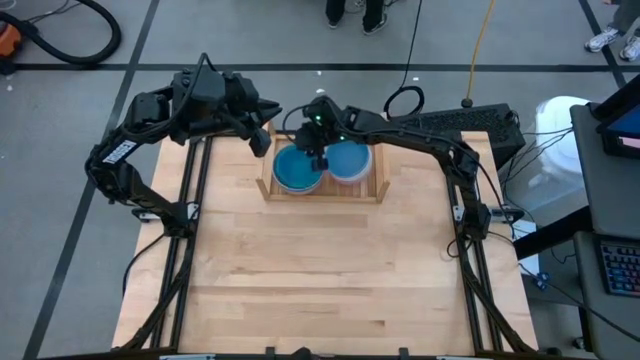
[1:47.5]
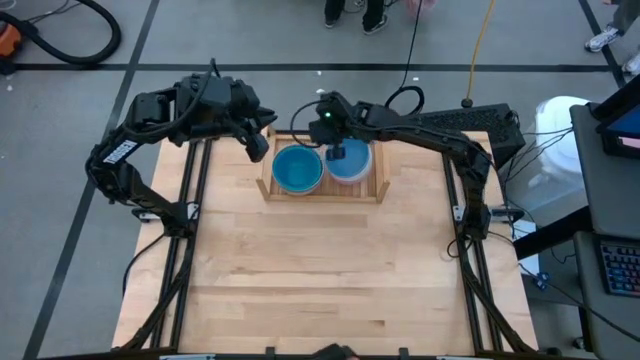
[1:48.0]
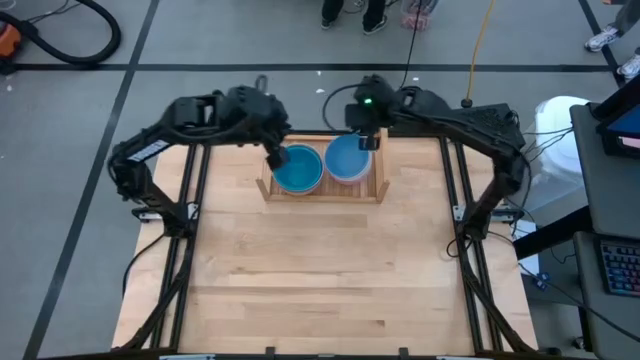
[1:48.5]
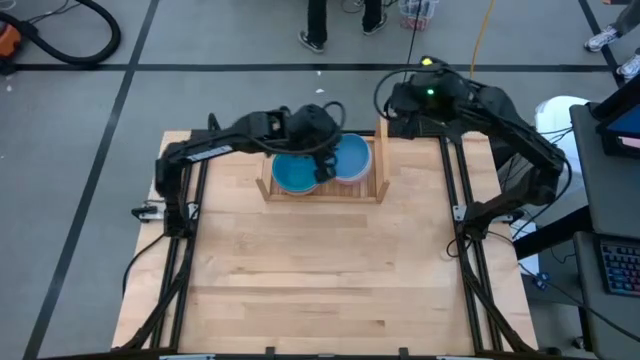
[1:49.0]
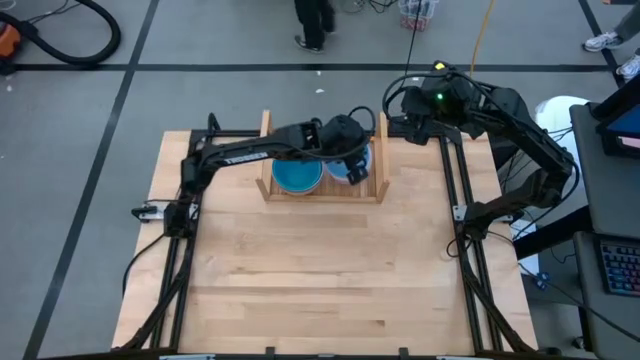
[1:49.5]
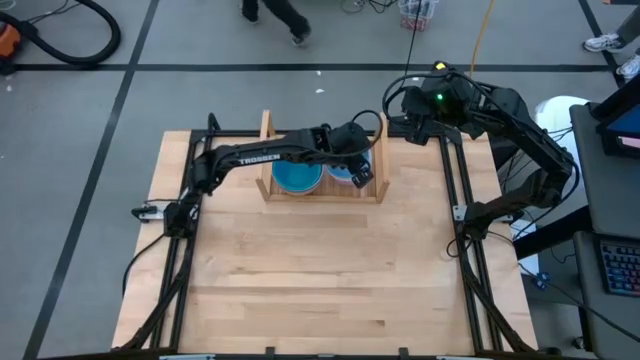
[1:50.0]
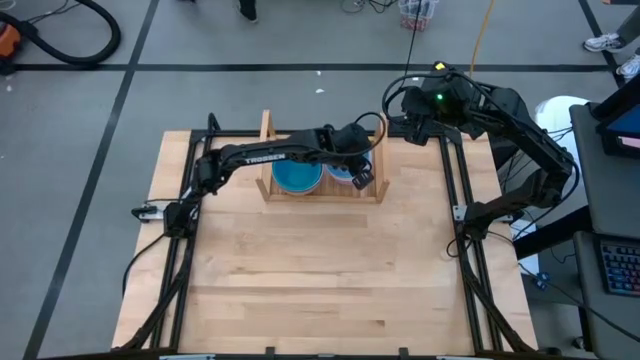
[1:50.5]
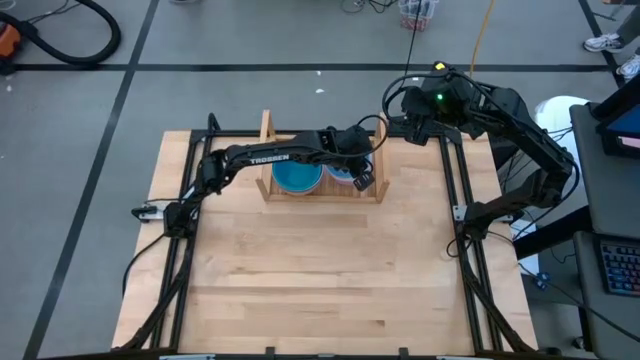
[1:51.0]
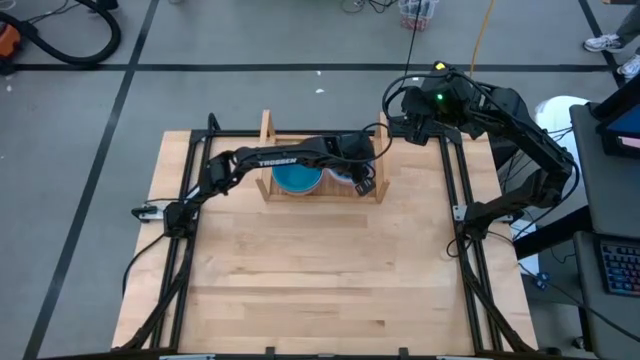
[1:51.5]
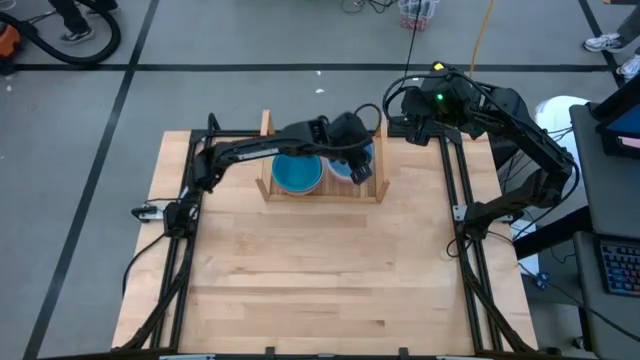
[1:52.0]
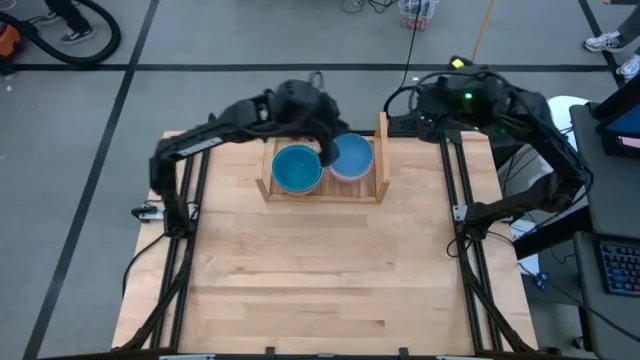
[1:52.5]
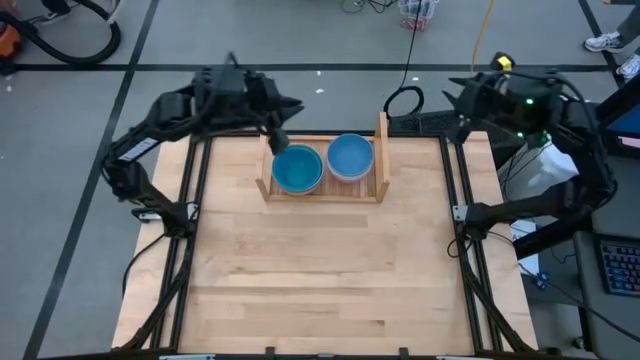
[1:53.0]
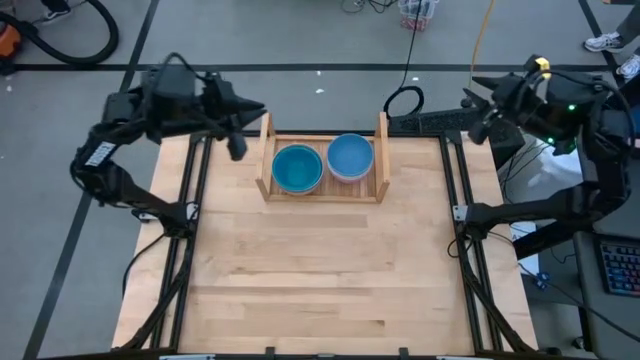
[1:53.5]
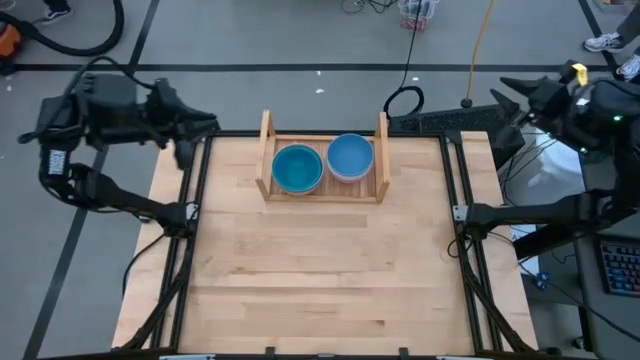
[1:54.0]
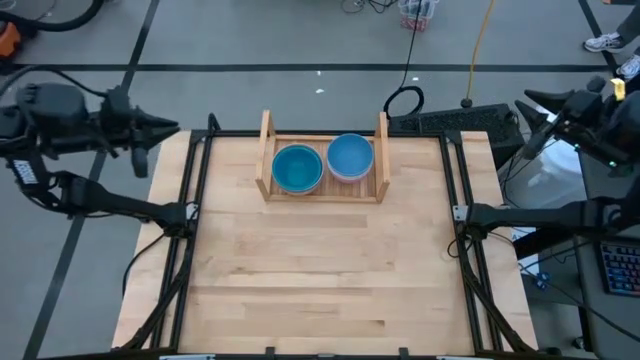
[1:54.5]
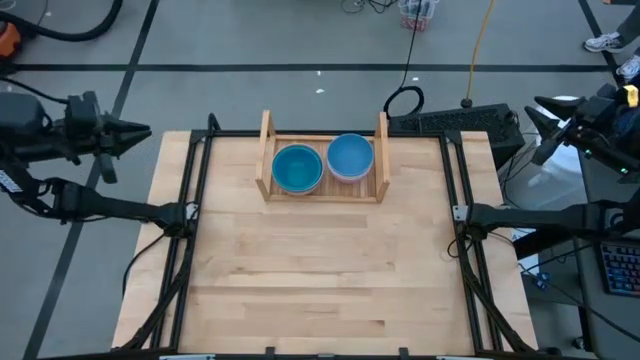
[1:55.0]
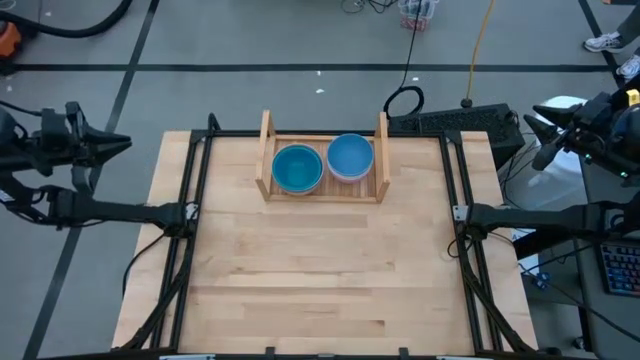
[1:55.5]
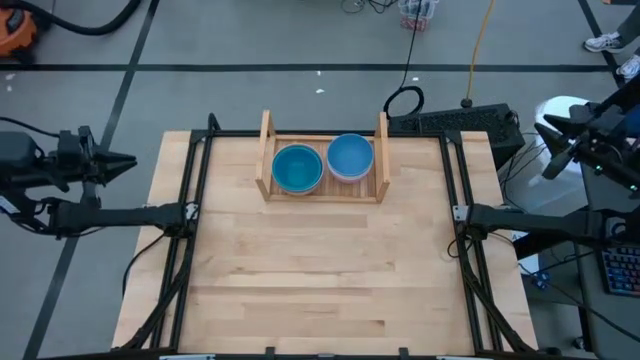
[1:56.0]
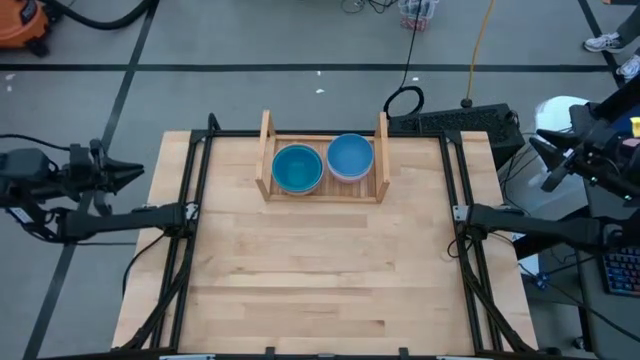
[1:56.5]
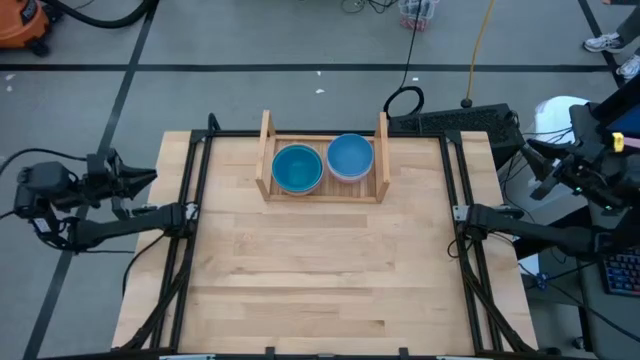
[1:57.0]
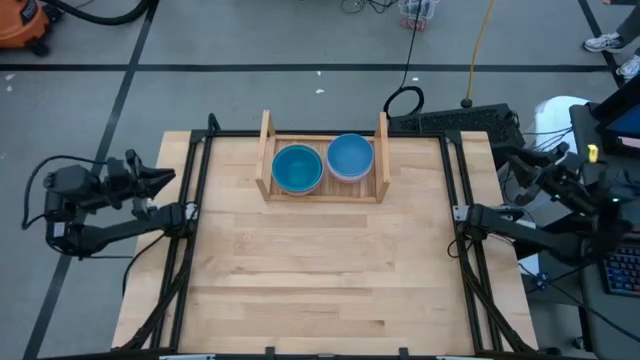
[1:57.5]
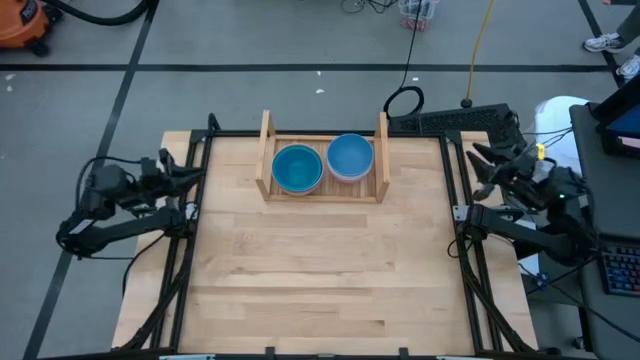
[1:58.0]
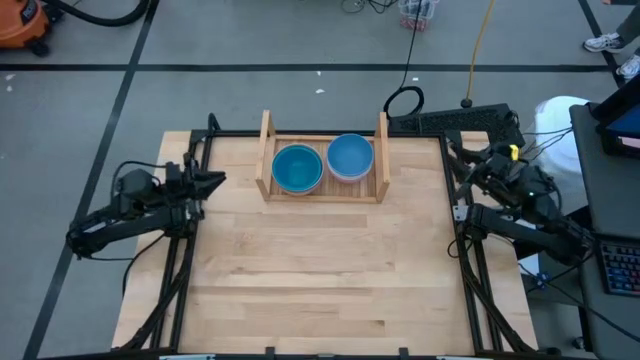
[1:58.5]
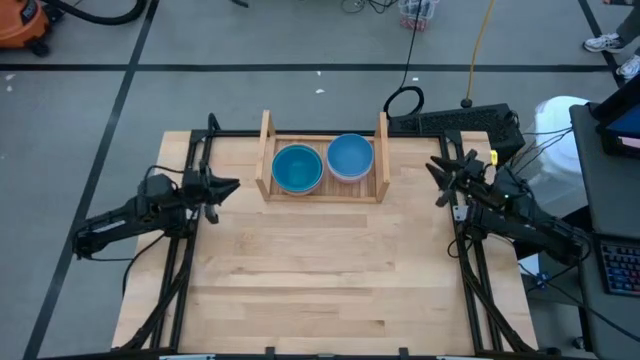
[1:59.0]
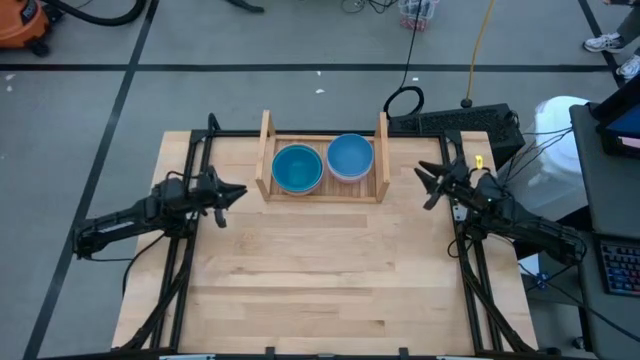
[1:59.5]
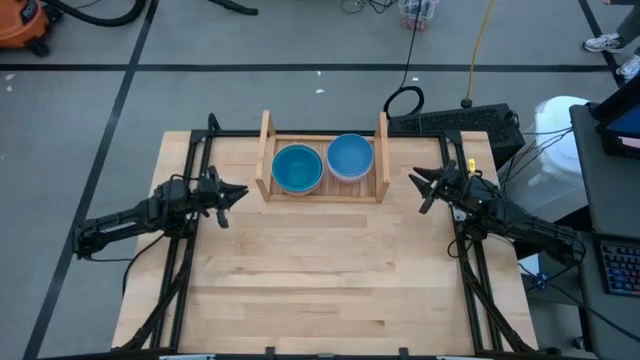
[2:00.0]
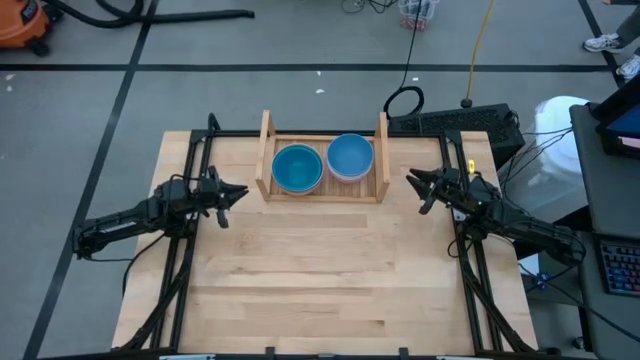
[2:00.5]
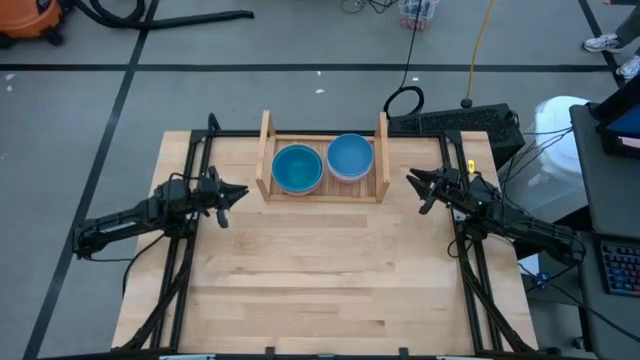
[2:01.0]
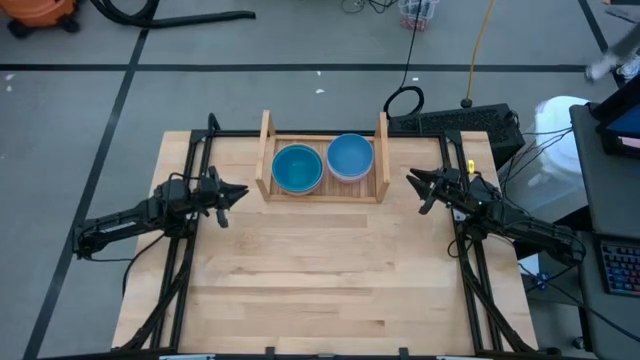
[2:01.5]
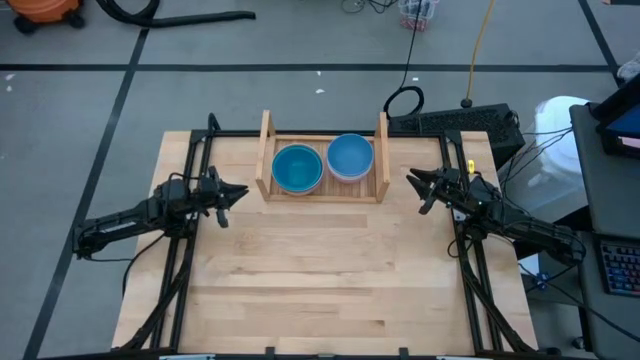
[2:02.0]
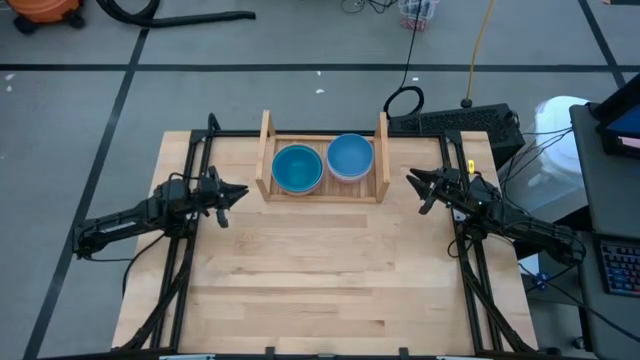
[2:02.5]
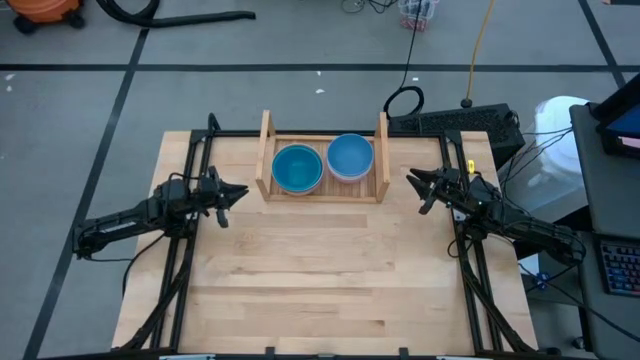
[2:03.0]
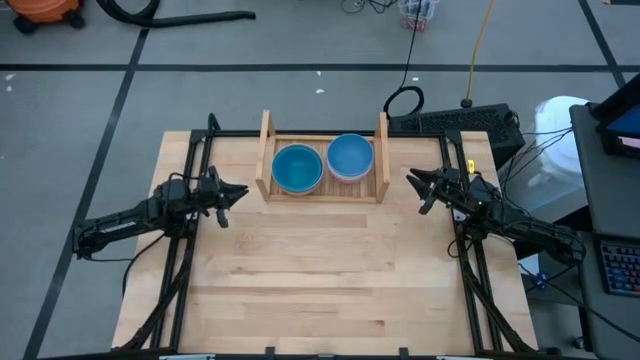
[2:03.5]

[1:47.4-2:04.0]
Task: Place and stack bowls onto a shelf
Return to Home Position

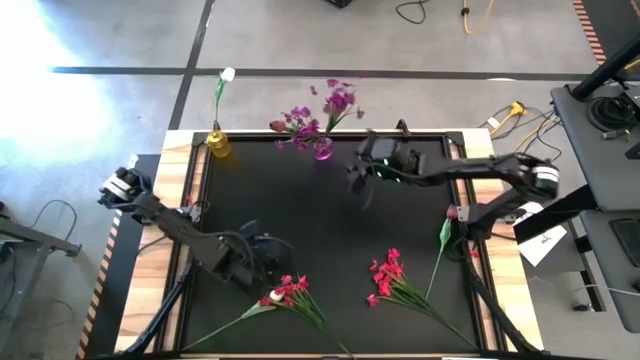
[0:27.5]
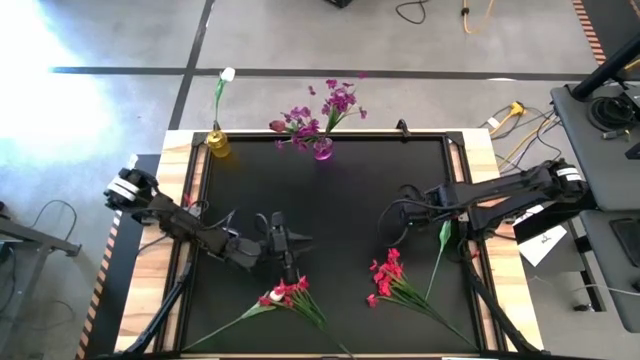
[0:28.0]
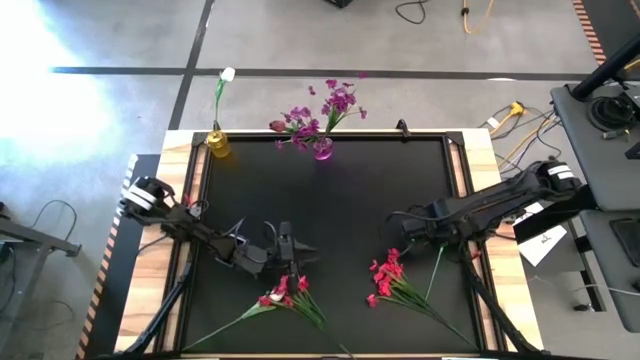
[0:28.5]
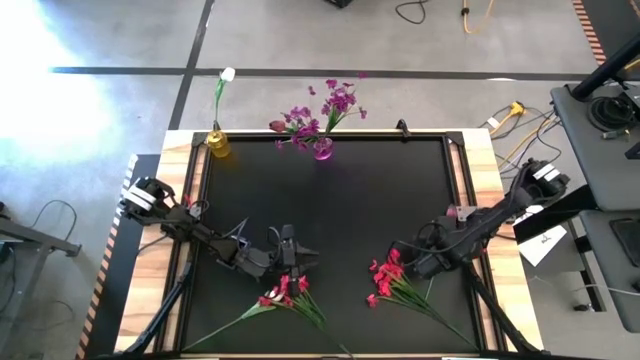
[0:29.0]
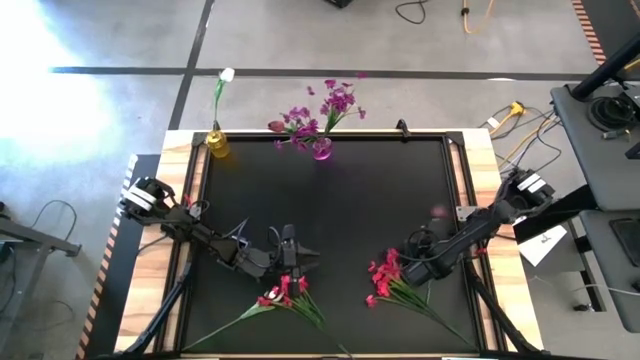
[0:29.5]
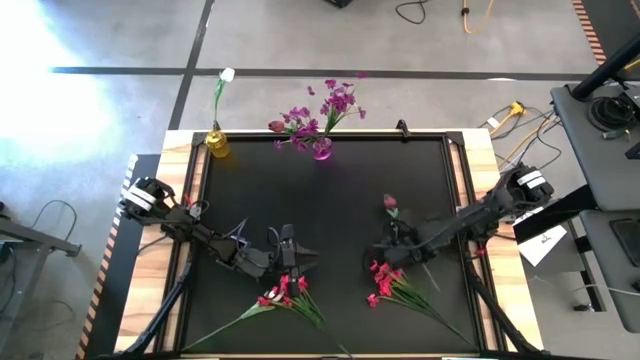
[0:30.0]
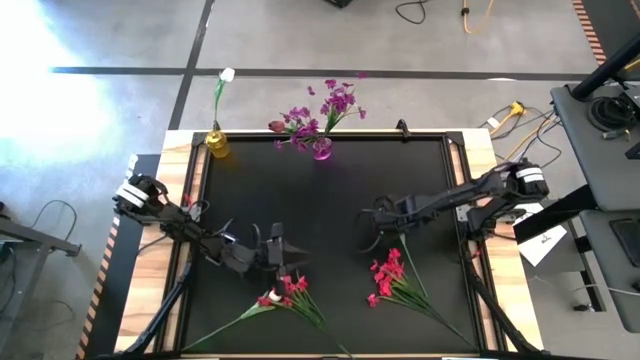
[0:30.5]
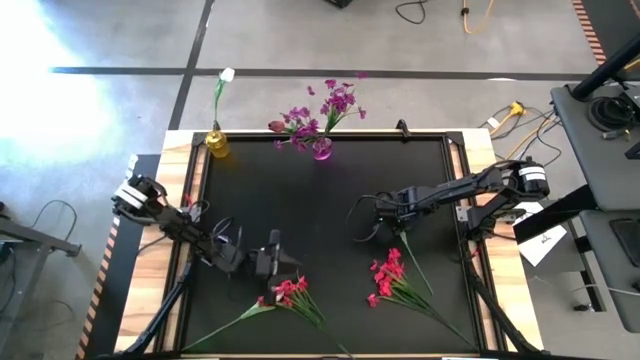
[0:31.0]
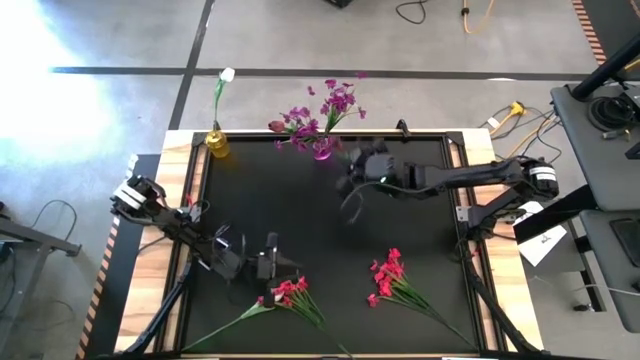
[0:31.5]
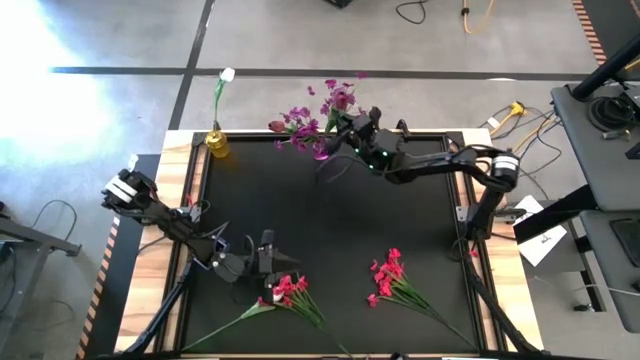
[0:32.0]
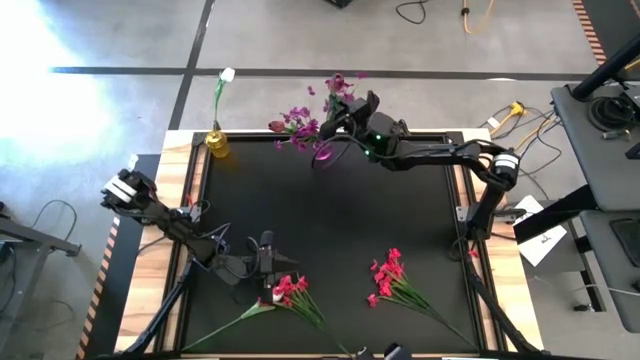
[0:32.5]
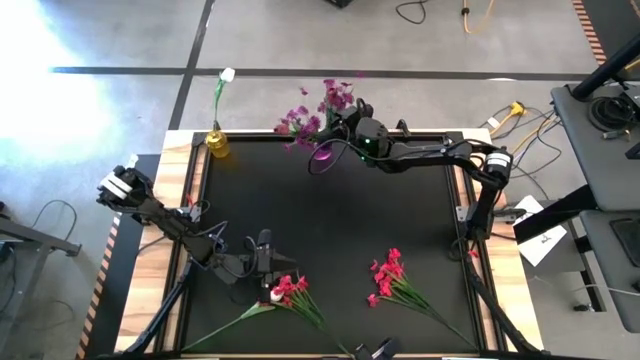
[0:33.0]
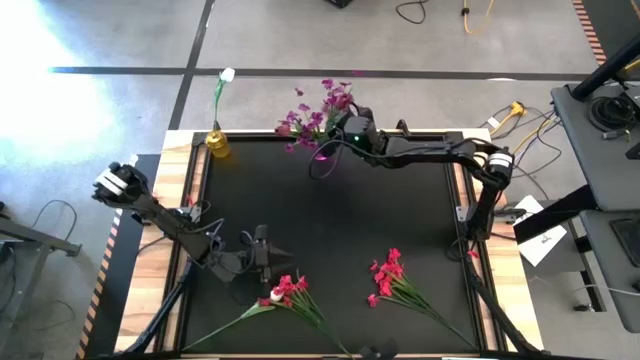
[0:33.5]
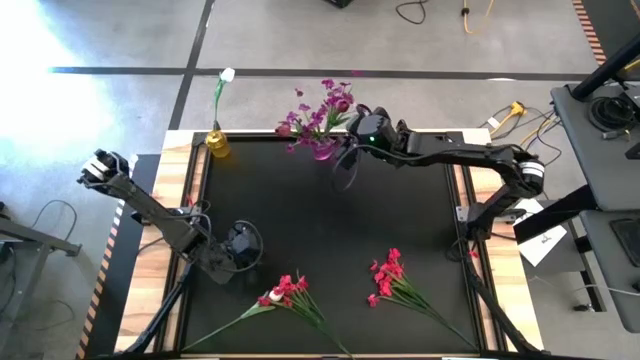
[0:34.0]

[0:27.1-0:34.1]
Task: Sort flowers into vase by color
Put the red tulip into the purple vase
